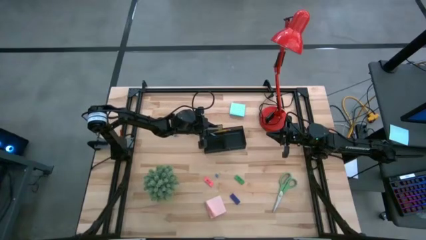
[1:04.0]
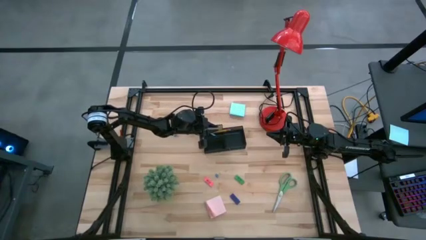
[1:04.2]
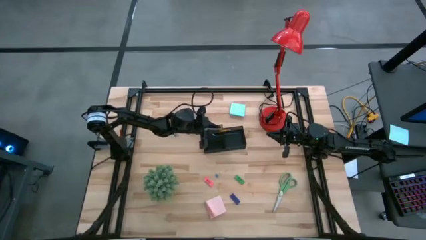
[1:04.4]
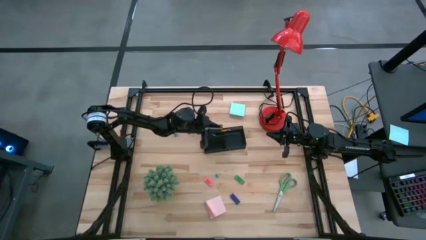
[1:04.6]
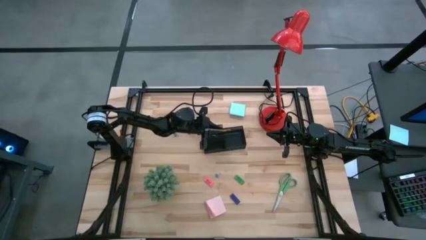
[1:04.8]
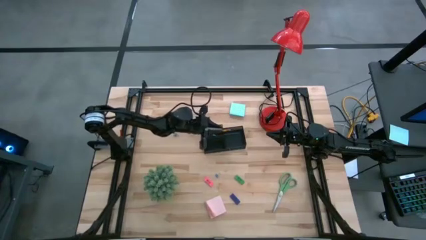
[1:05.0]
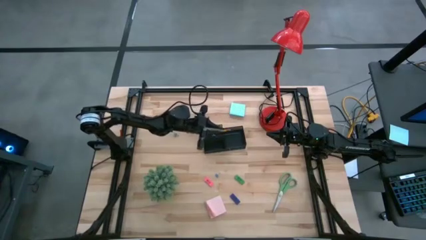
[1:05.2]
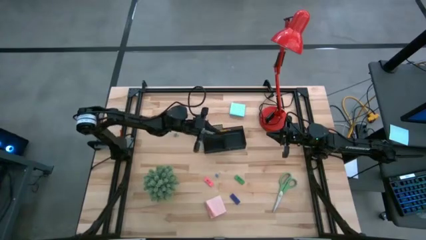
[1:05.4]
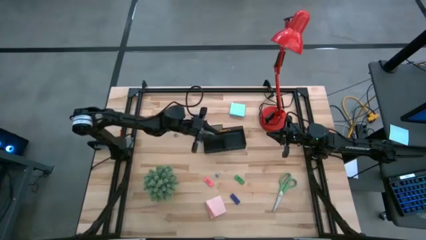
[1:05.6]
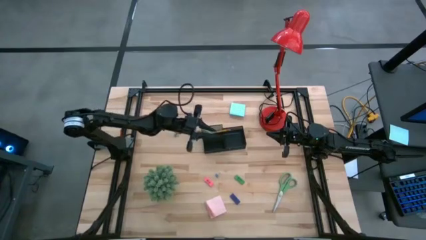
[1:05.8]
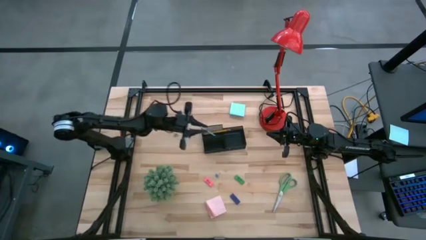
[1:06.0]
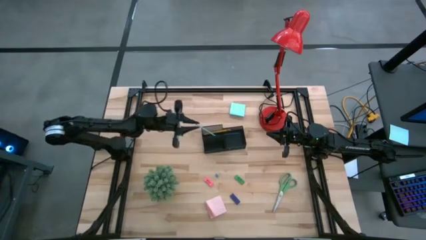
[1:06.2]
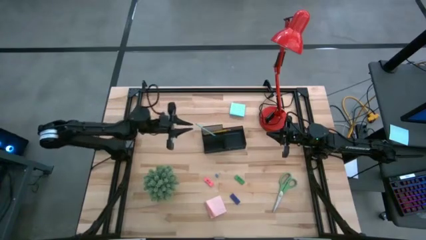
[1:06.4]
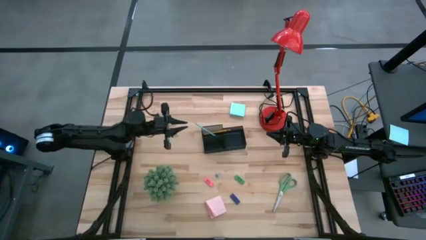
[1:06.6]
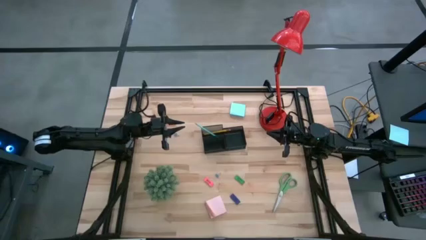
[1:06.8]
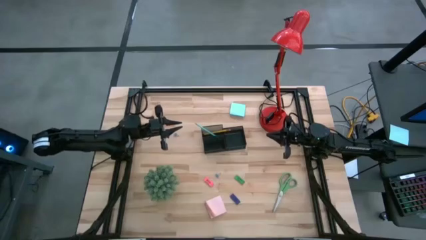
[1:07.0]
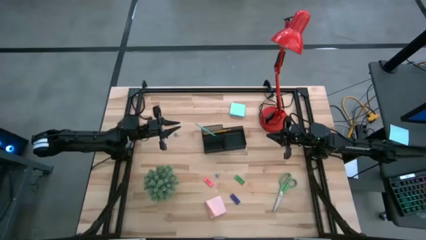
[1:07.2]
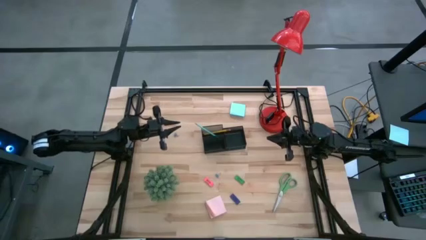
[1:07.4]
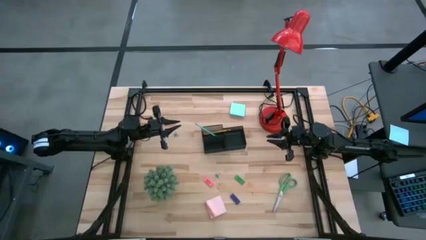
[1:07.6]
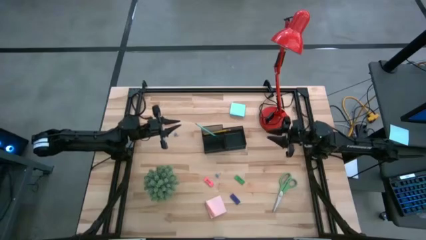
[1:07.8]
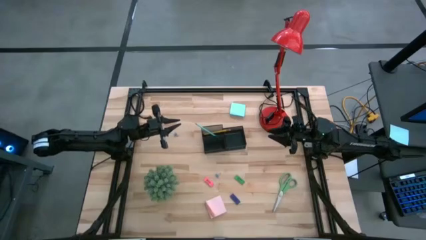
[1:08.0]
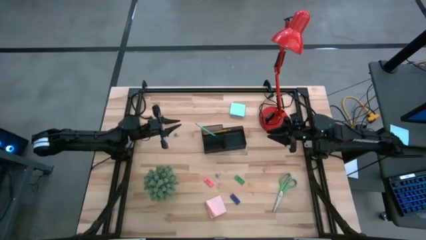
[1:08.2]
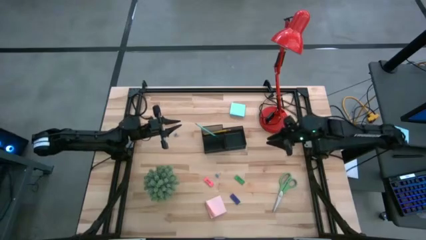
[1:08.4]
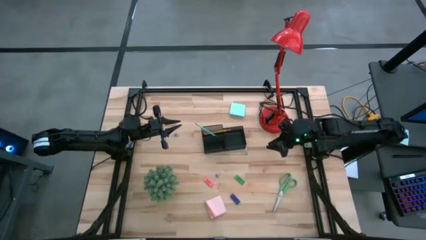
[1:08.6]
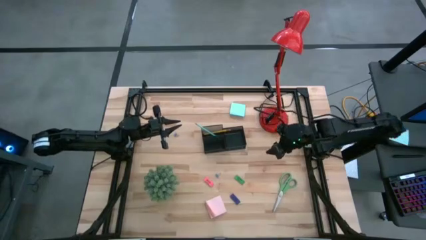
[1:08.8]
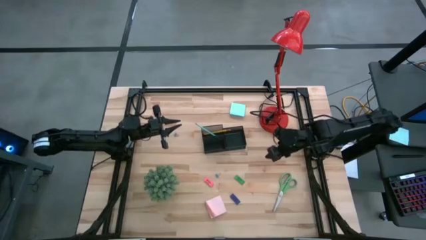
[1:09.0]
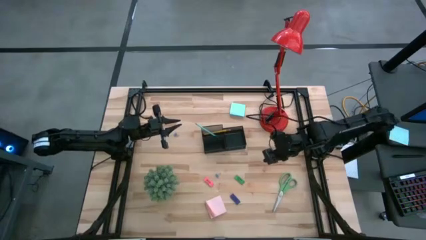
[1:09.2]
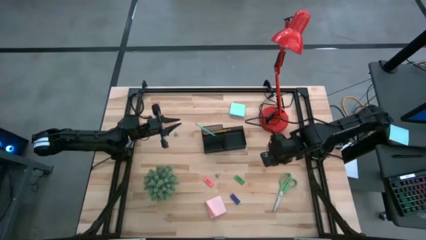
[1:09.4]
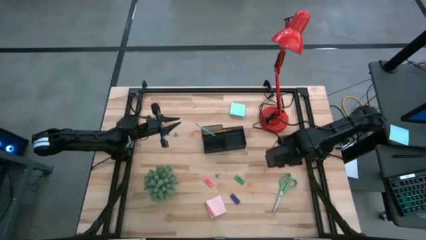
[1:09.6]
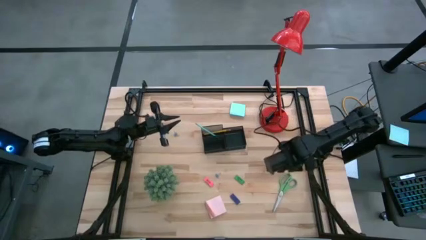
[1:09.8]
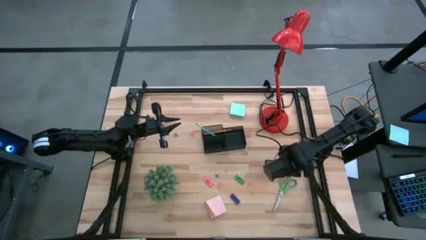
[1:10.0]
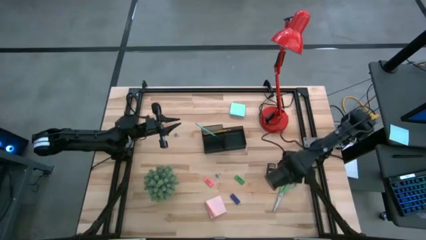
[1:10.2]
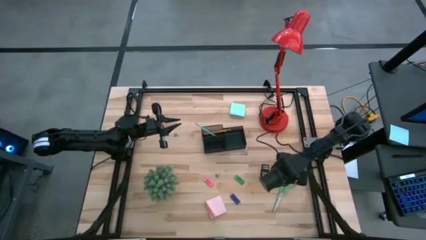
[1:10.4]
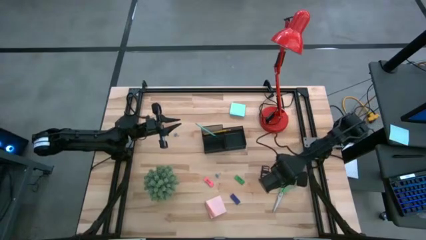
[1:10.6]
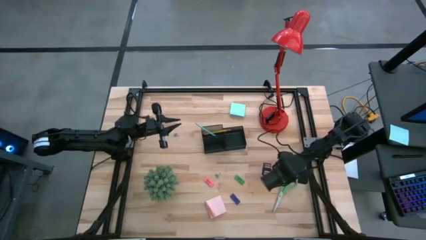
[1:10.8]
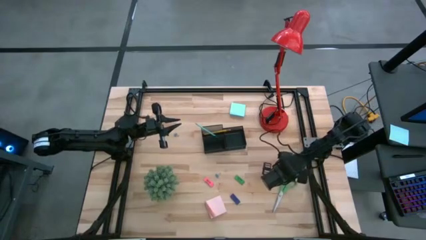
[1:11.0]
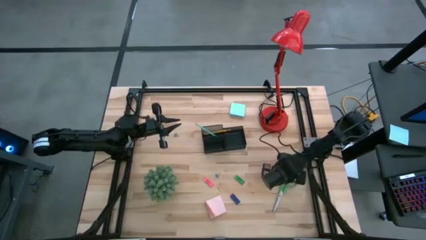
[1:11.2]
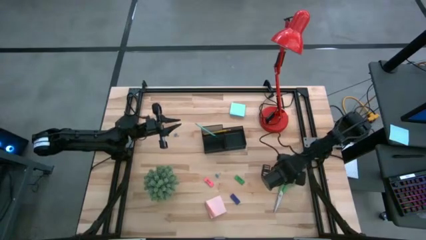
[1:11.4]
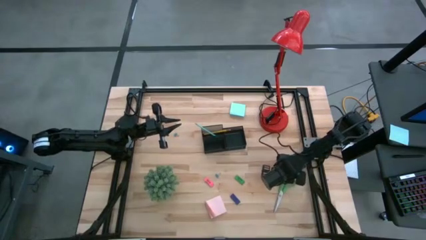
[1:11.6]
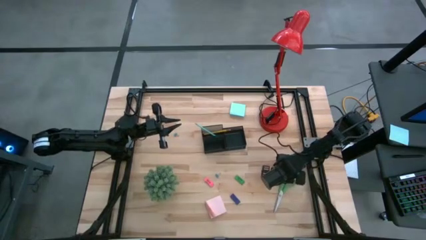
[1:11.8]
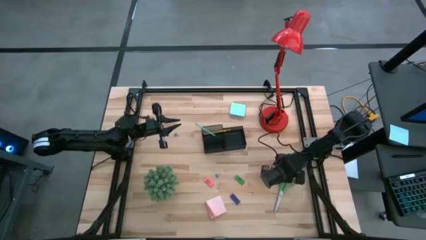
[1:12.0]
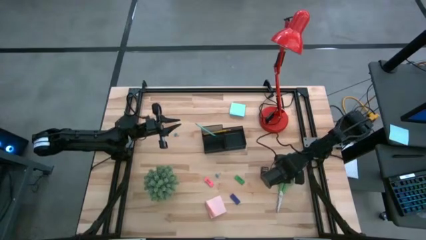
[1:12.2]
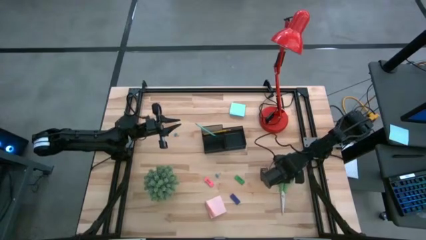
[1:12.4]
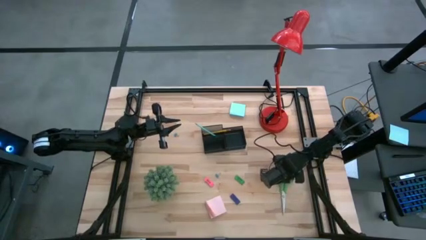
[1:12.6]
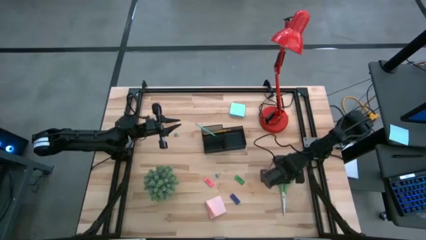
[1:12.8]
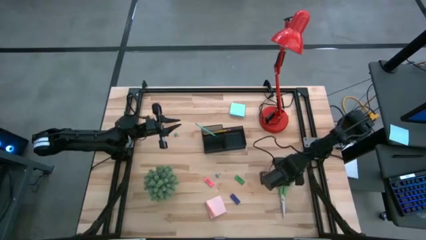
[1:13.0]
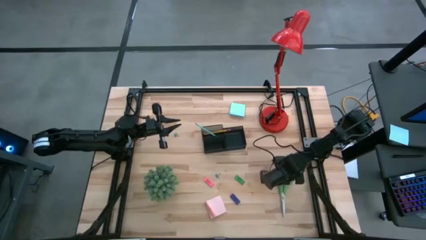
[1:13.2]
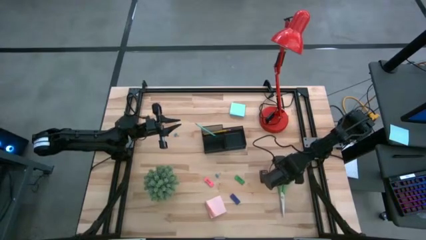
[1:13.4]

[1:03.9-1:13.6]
Task: Pick and place office supplies into organizer
Put the green scissors into the black desk organizer

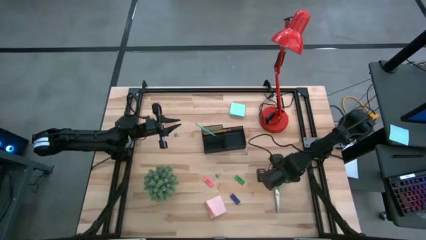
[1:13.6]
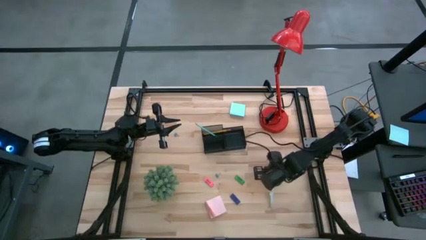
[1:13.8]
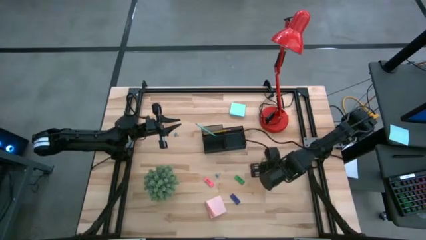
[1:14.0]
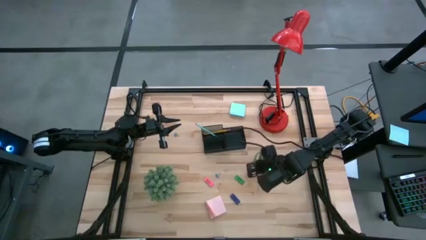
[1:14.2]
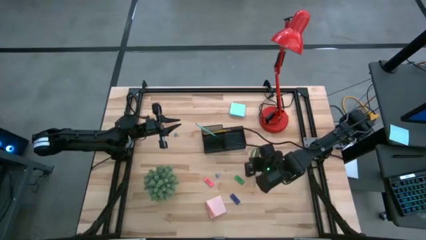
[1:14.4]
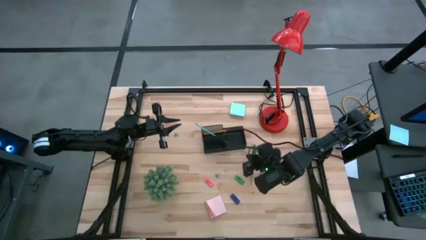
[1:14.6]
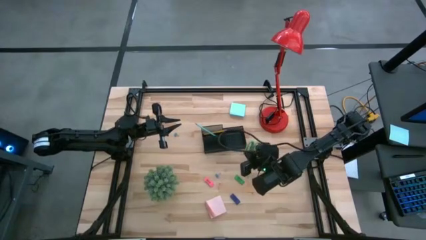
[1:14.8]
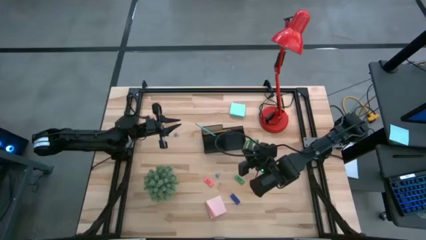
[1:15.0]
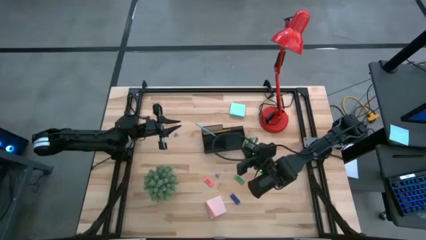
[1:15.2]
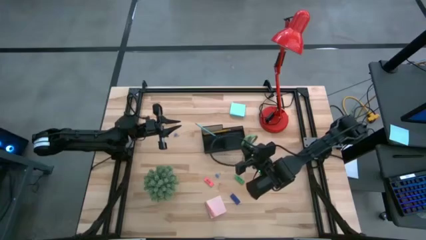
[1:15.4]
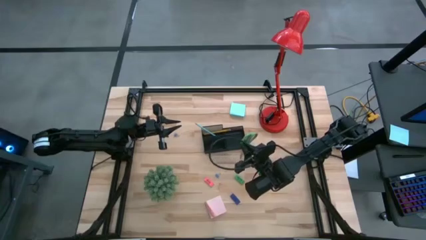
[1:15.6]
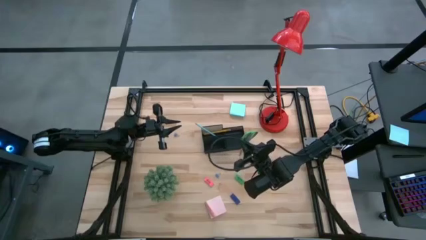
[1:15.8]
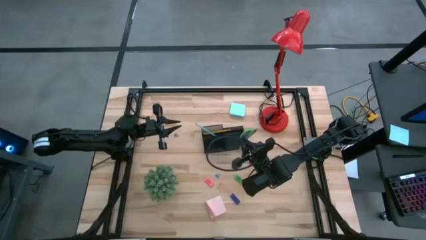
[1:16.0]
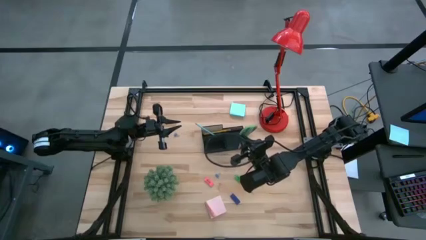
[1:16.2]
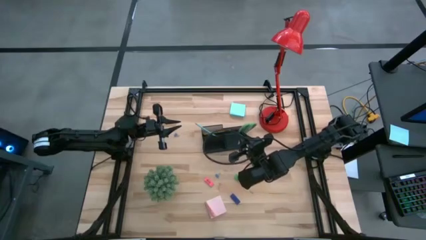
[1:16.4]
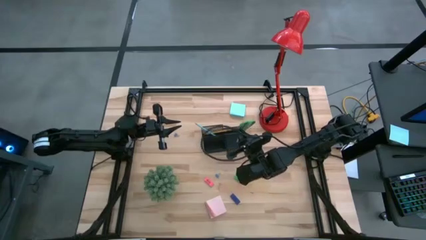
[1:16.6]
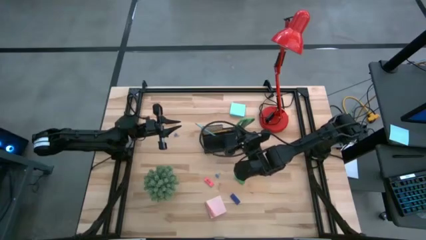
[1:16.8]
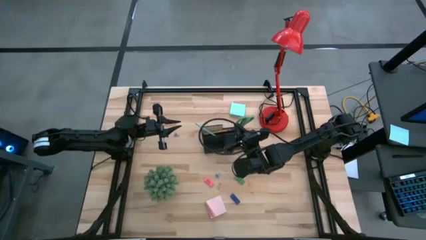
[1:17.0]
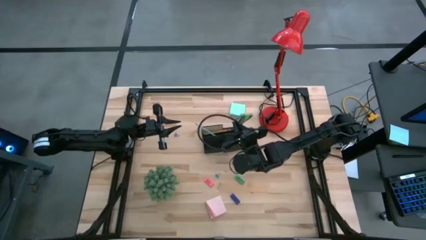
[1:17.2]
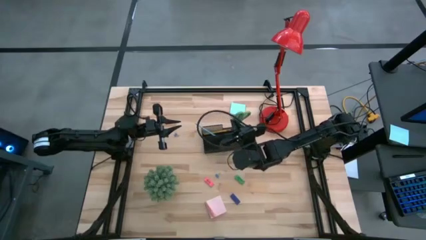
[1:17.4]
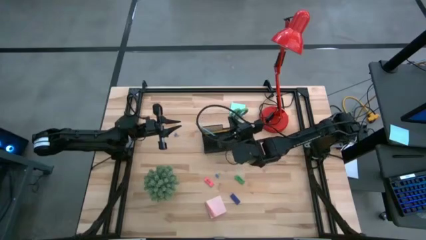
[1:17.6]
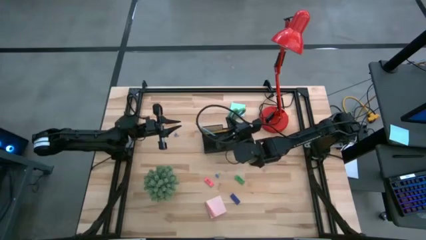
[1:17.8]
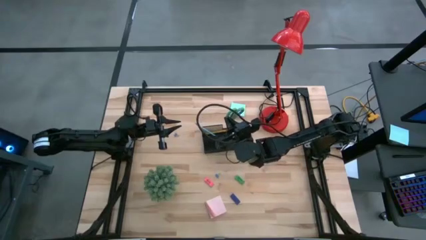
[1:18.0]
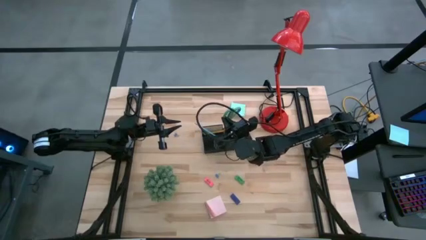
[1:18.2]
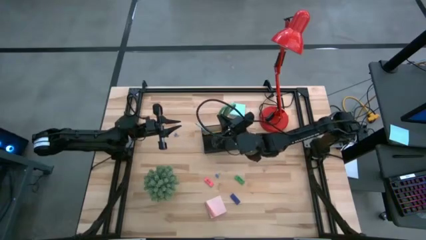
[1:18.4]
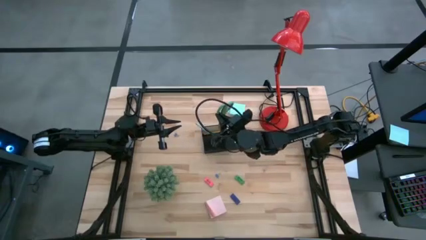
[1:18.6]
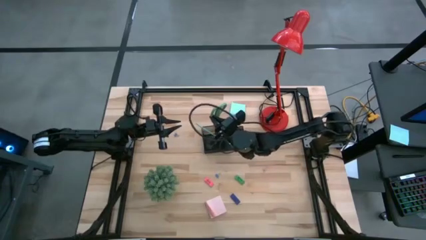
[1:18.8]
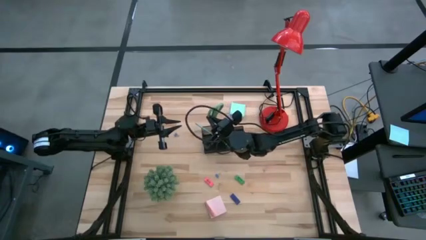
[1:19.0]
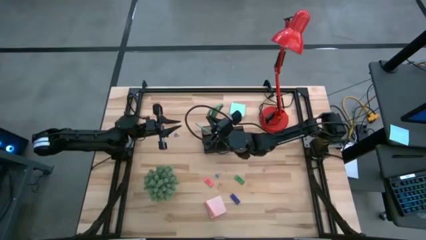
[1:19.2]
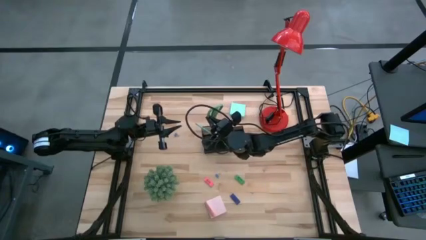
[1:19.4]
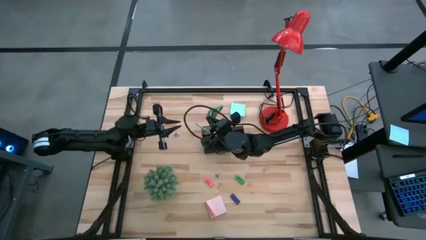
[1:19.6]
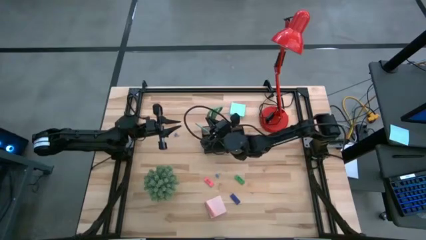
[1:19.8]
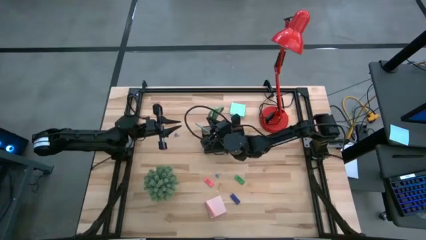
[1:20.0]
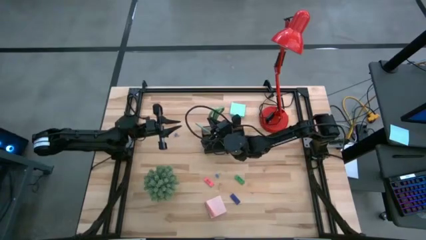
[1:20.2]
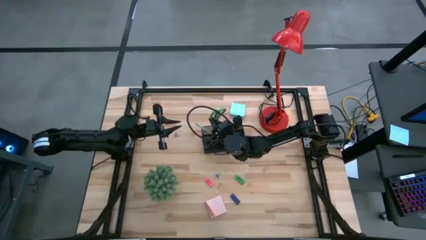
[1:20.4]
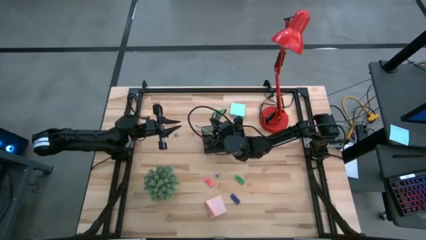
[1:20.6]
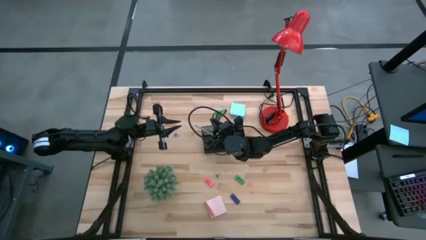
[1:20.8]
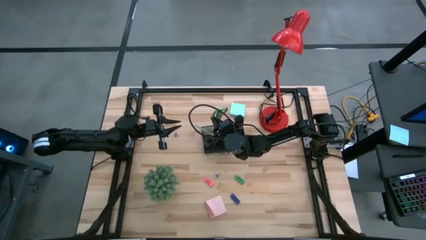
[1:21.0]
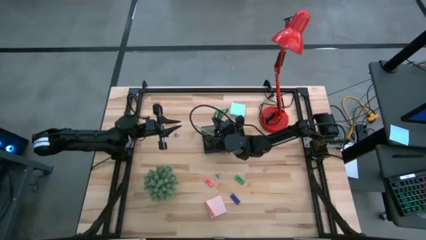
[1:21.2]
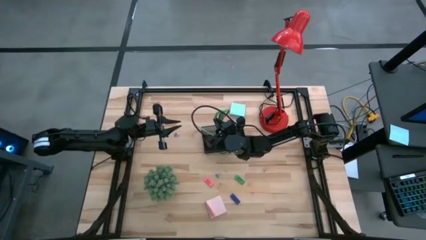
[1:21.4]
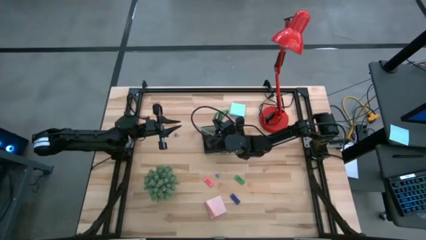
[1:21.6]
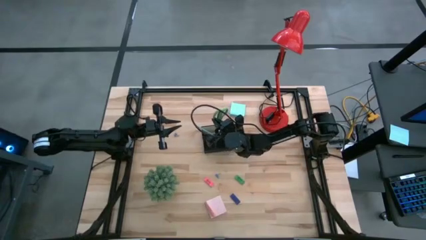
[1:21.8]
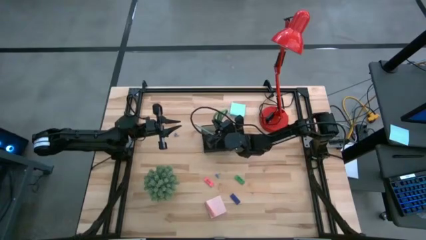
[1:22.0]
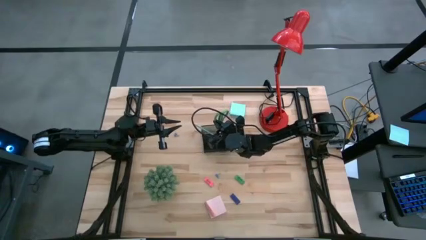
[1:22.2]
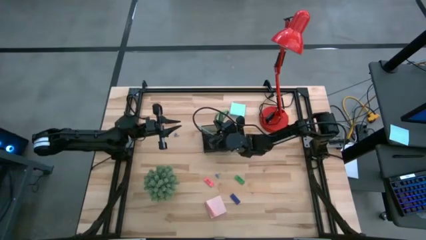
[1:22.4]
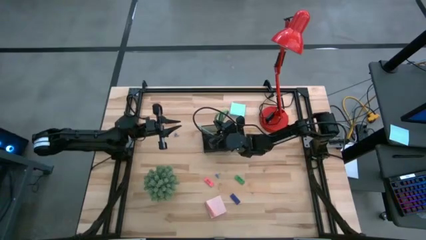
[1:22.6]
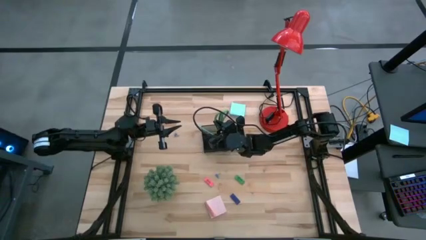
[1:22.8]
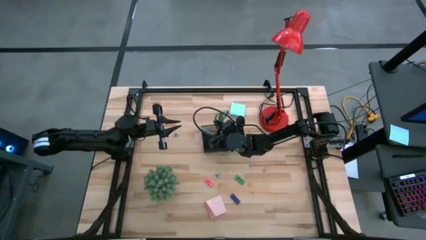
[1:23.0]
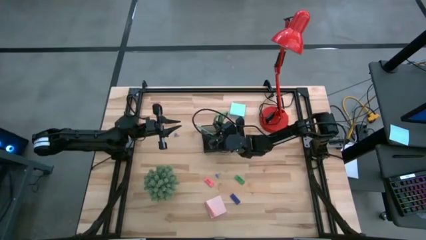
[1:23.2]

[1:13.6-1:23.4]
Put the green scissors into the black desk organizer
